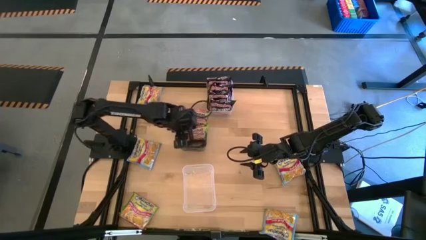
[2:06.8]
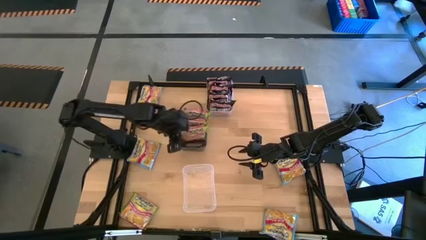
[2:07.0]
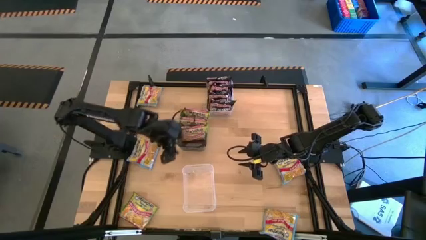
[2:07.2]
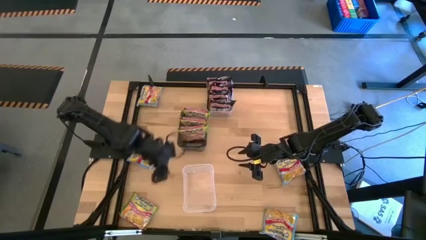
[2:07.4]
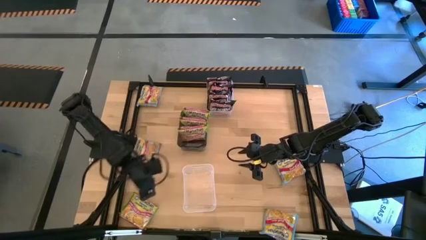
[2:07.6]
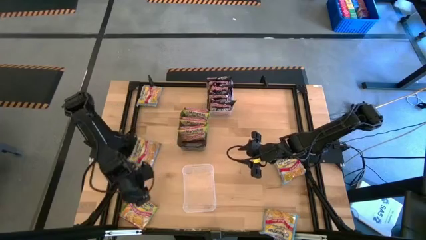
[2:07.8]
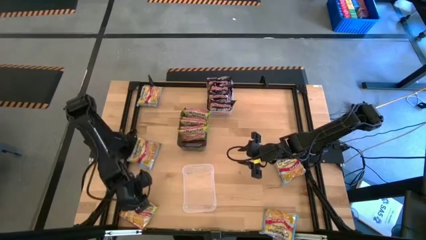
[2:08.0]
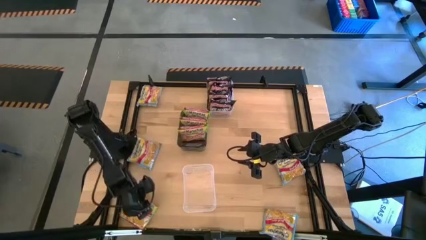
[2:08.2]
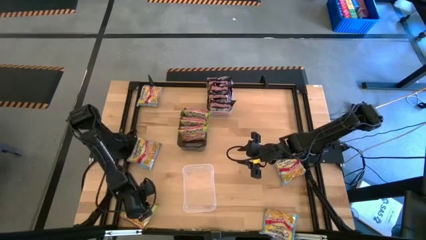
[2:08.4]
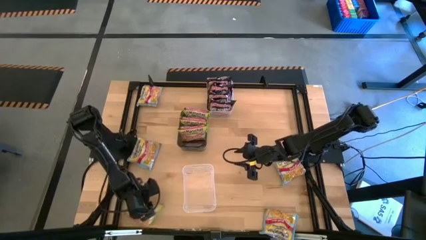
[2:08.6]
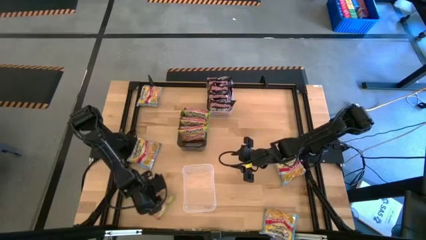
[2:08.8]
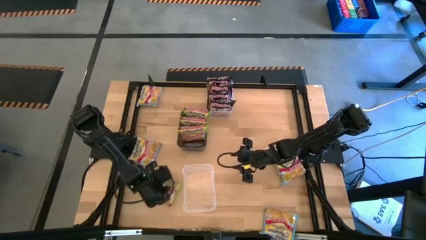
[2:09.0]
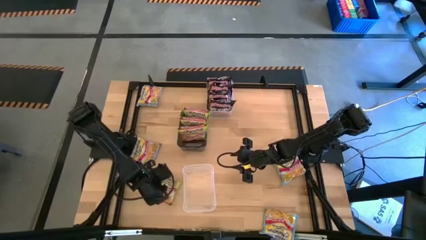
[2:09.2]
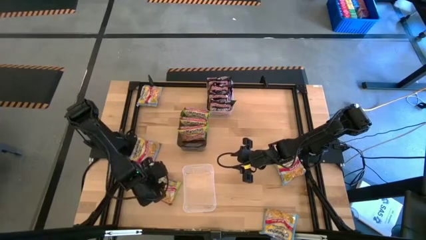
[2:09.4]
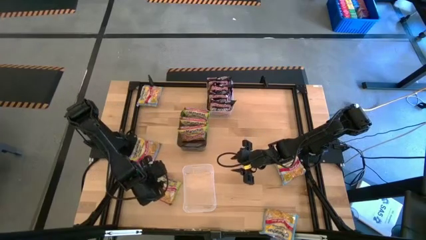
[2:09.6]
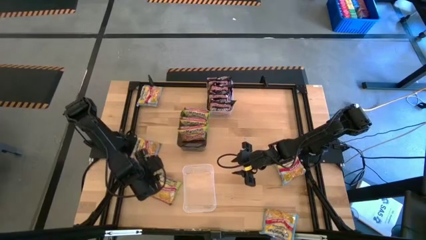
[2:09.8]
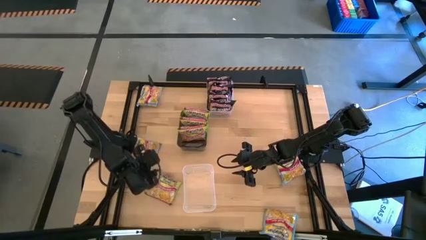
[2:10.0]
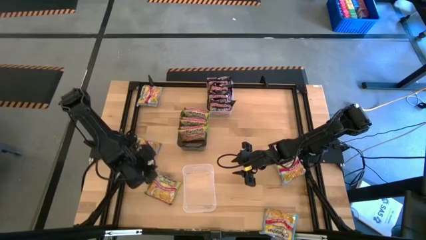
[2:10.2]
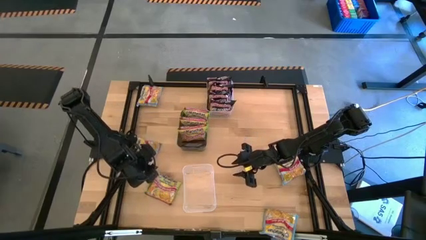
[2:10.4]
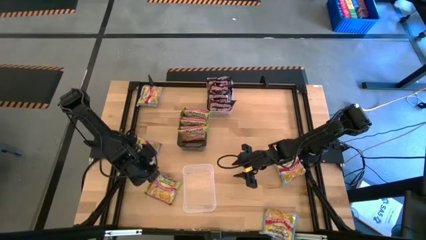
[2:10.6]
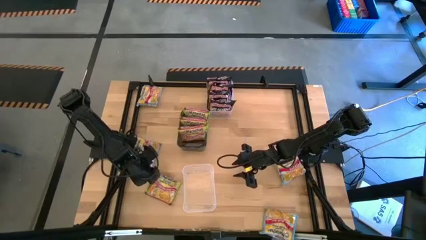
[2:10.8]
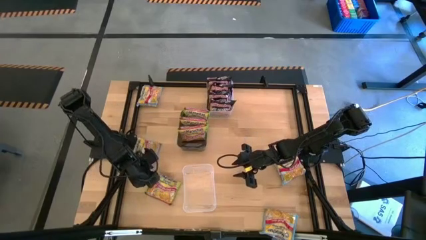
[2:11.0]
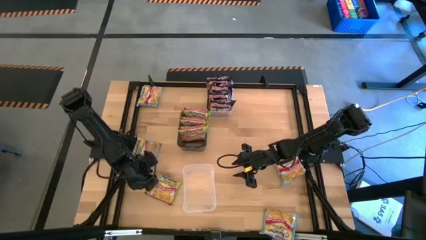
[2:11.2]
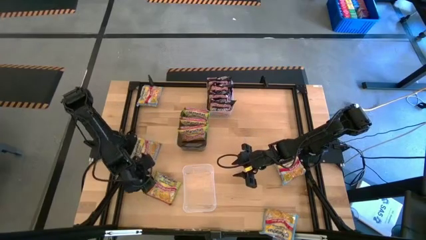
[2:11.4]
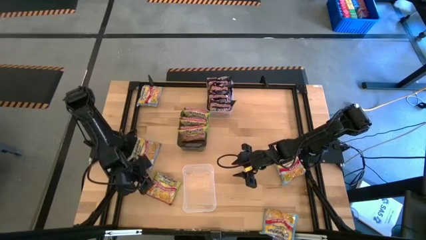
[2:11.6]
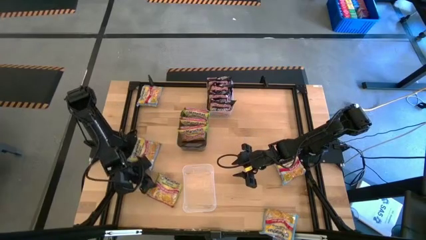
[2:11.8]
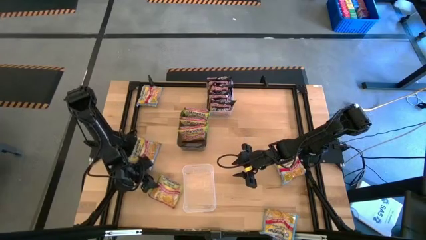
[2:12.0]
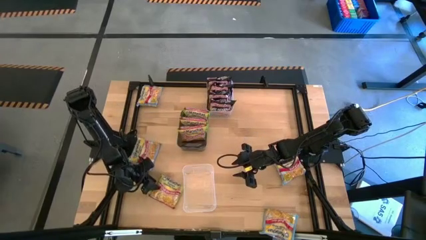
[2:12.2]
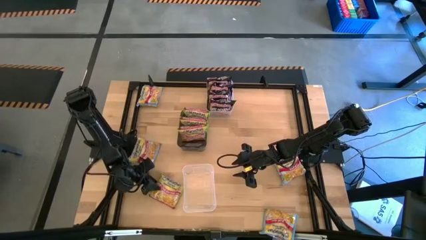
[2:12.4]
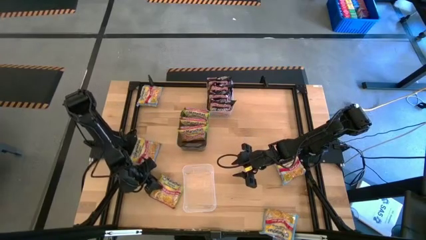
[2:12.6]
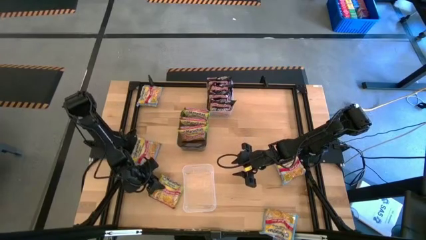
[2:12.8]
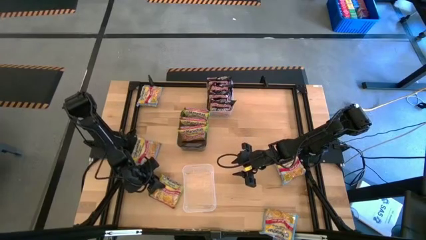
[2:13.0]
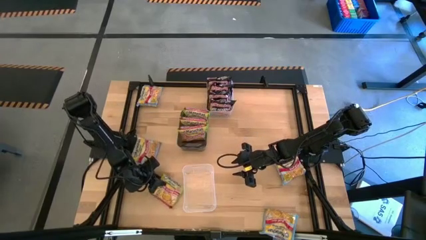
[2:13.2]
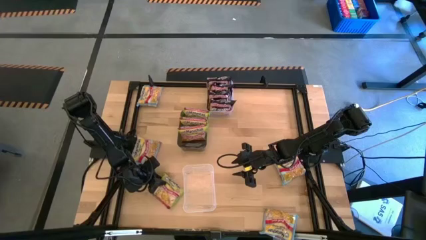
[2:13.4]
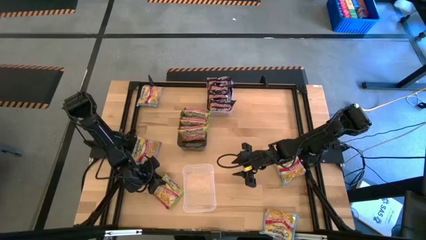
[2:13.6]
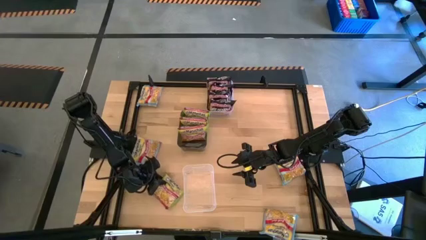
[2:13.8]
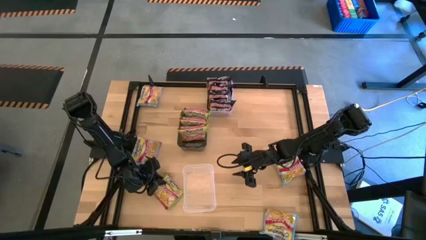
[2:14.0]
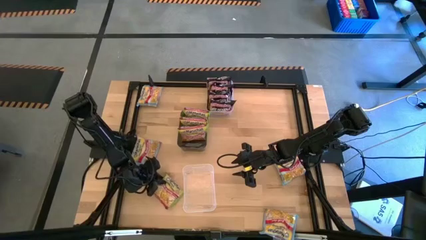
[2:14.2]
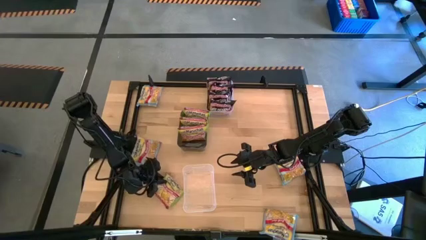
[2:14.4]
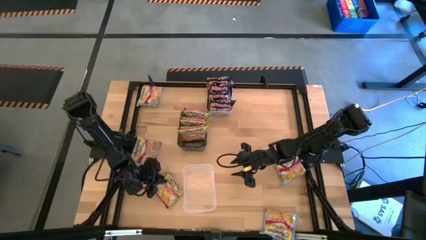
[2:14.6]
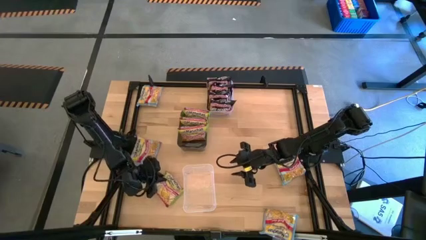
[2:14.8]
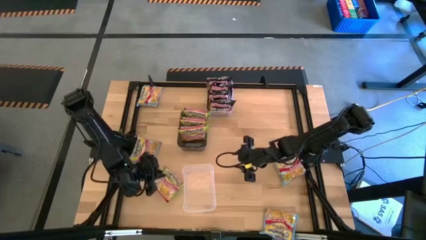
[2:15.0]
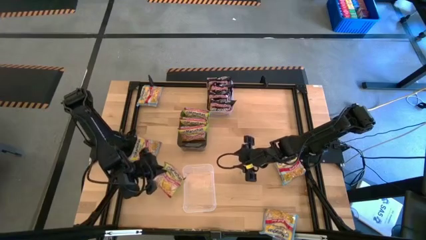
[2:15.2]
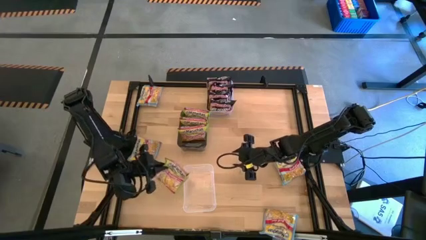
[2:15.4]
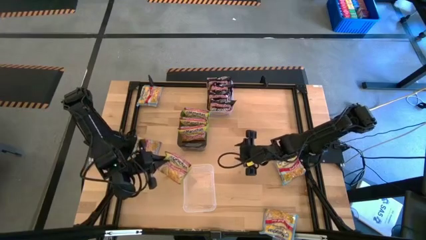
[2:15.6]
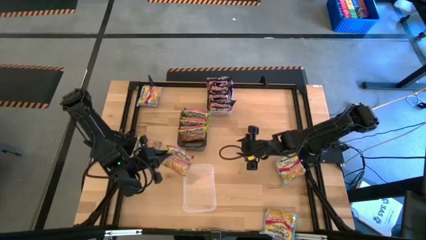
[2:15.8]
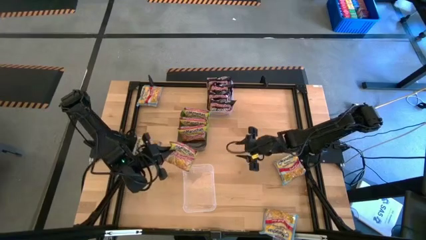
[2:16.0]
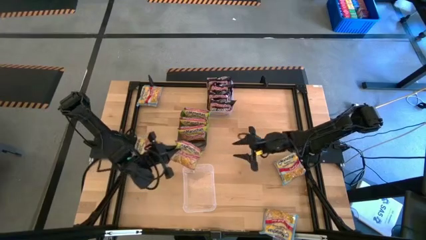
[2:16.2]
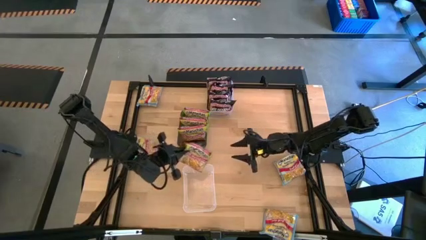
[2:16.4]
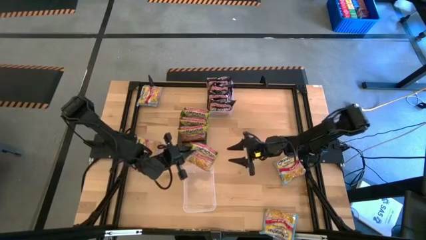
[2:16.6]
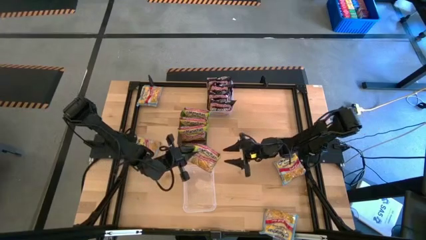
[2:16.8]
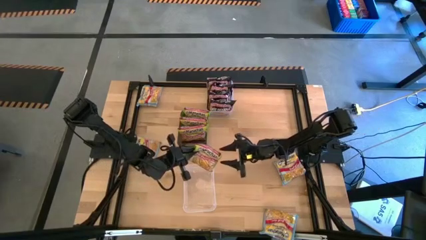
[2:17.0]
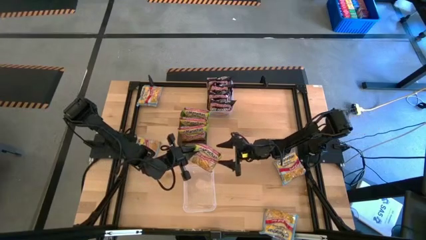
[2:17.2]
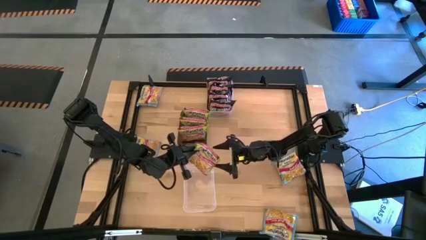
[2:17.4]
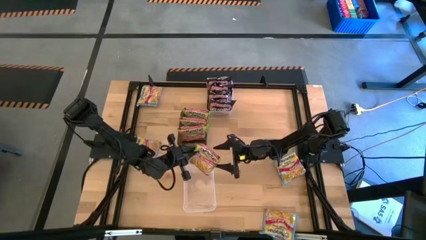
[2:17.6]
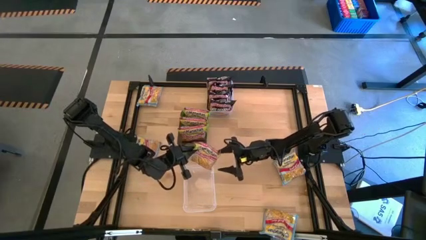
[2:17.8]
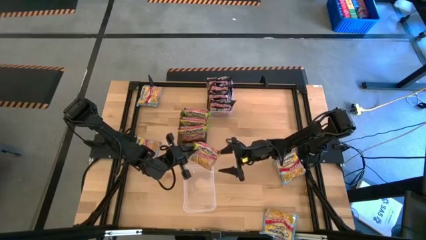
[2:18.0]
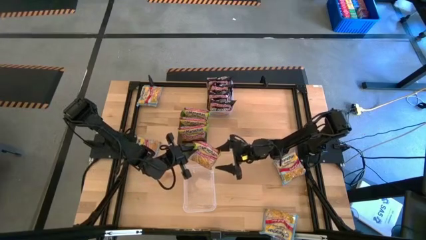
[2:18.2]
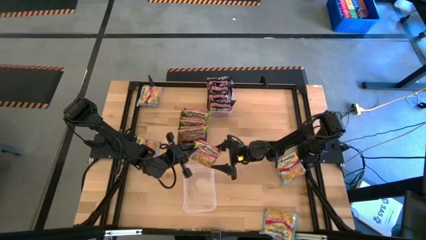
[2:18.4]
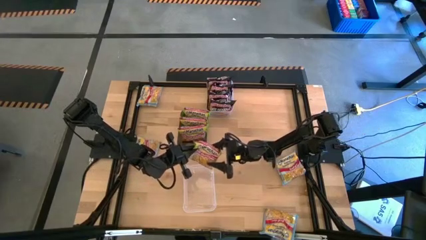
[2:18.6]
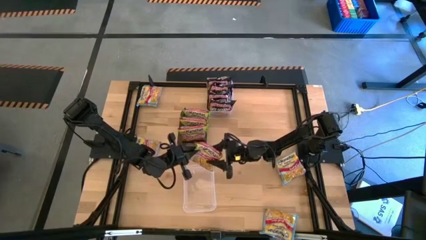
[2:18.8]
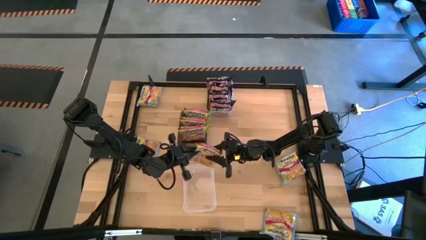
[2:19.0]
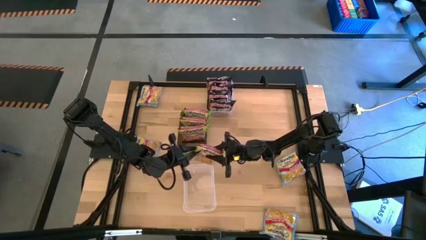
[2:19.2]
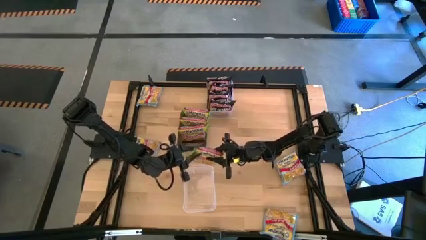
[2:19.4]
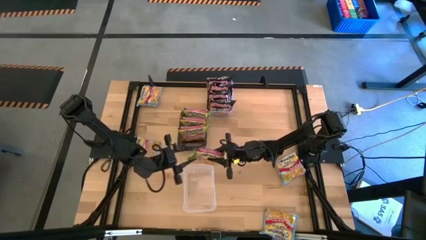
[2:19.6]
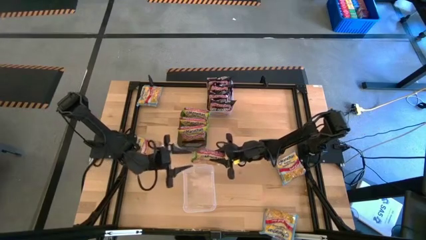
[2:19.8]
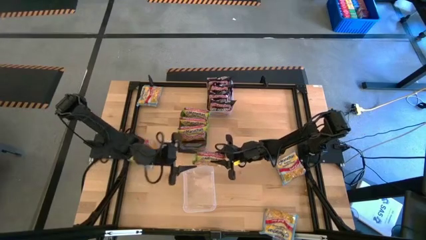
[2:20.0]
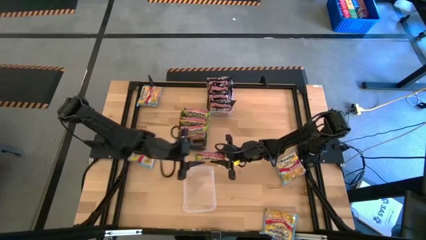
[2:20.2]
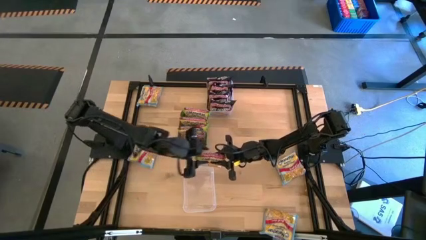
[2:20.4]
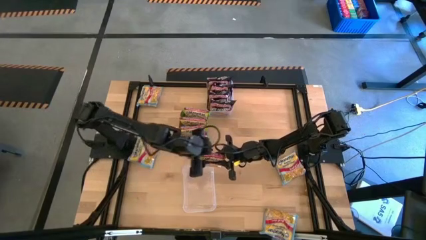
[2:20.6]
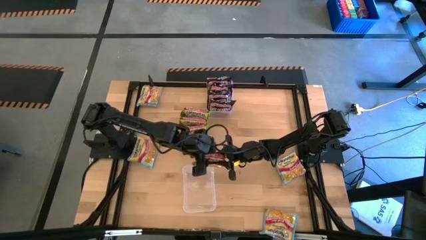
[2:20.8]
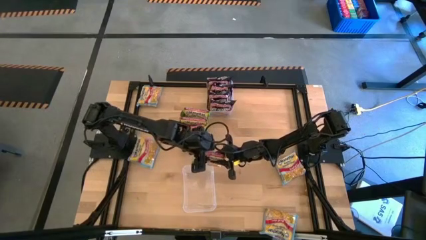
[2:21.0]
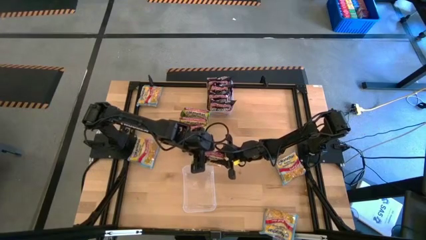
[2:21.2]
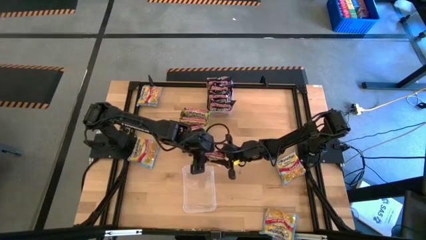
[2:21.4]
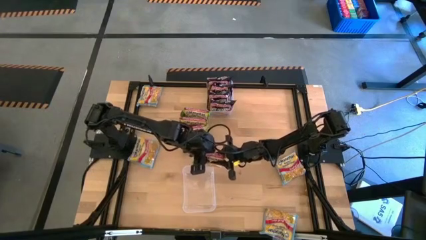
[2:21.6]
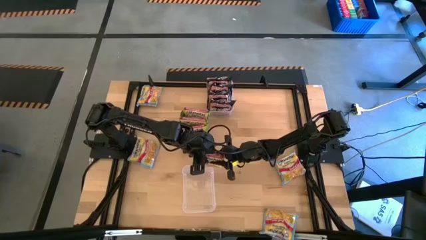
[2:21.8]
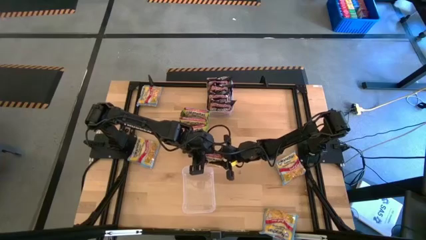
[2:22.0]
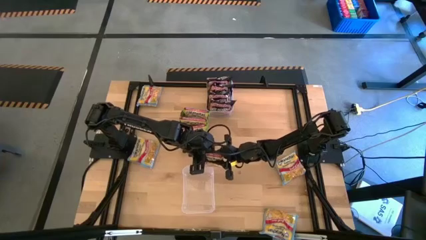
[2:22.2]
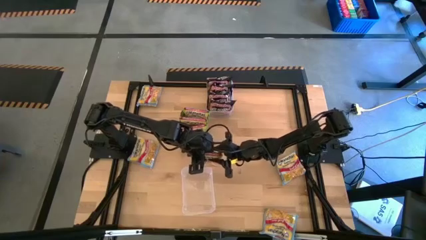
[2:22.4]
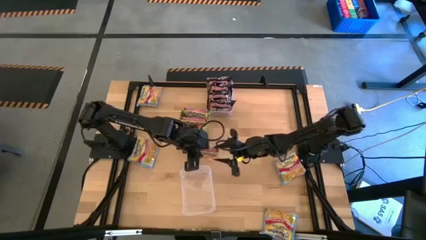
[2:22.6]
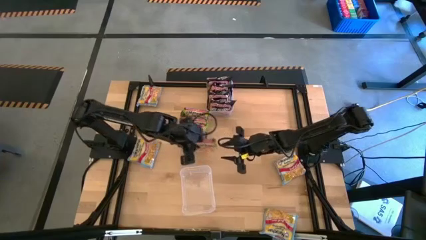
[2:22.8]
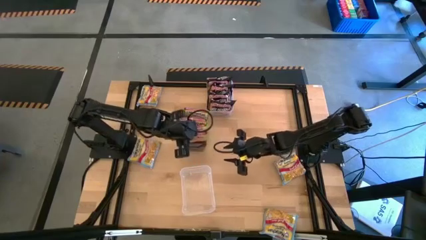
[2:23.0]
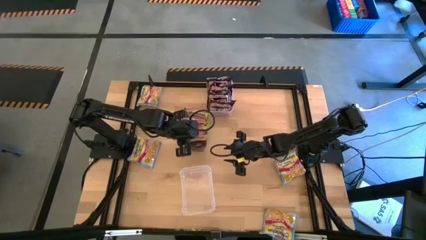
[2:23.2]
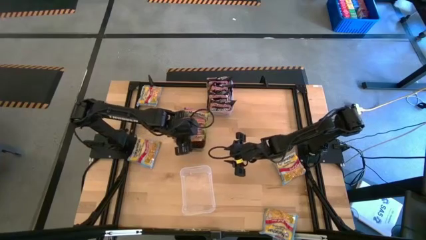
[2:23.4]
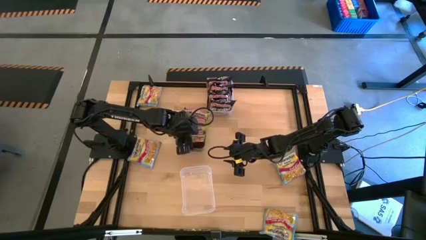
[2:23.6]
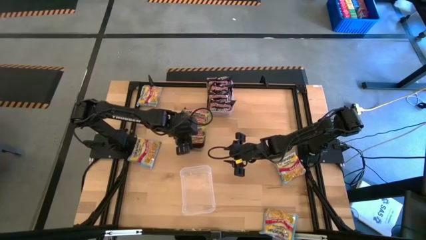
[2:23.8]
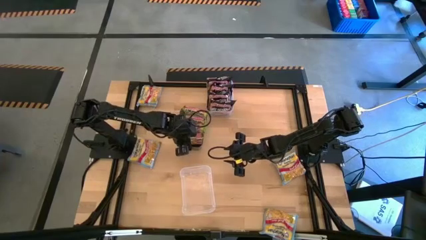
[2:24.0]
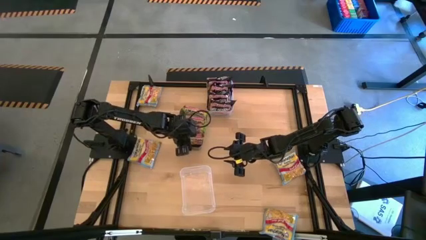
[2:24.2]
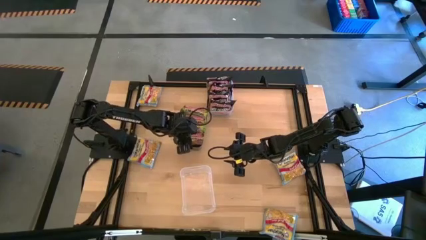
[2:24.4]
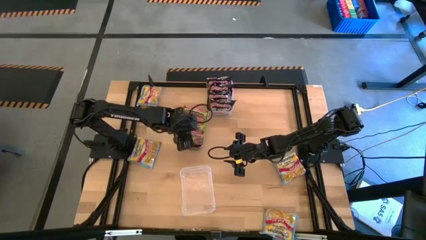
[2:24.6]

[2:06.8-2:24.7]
Task: Sort Maruchan noodles
Put the green noodle pack into the black bin
